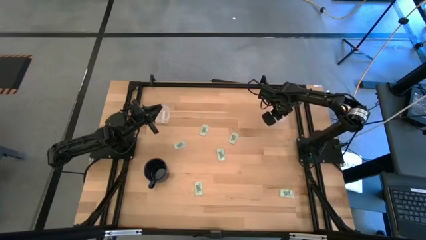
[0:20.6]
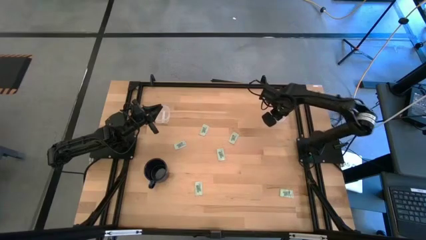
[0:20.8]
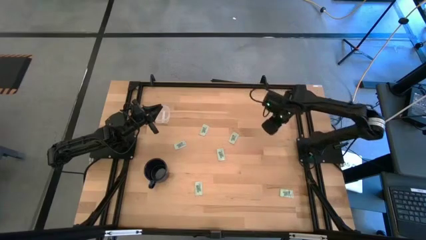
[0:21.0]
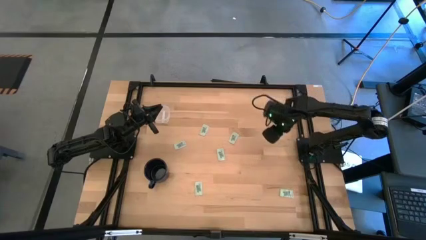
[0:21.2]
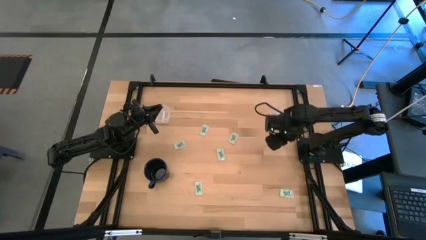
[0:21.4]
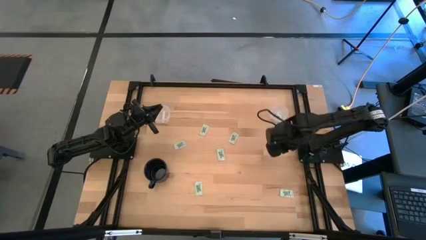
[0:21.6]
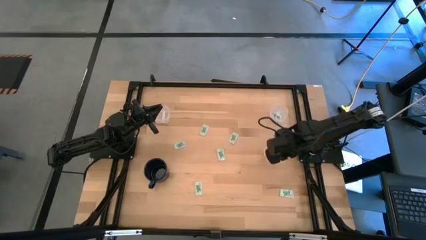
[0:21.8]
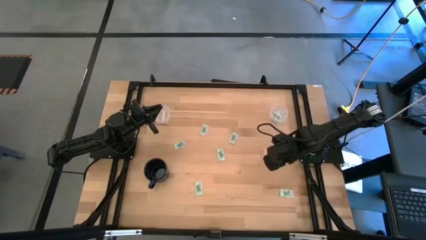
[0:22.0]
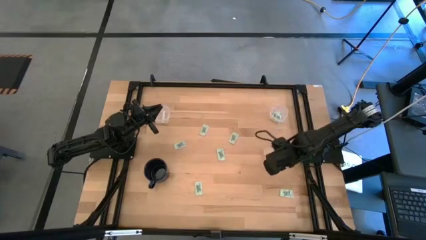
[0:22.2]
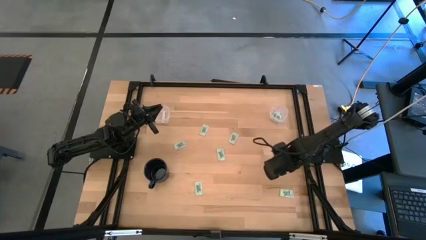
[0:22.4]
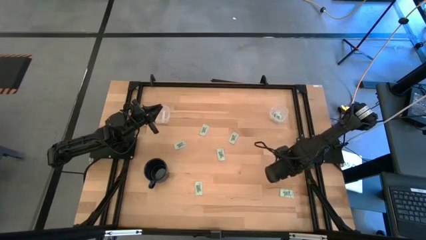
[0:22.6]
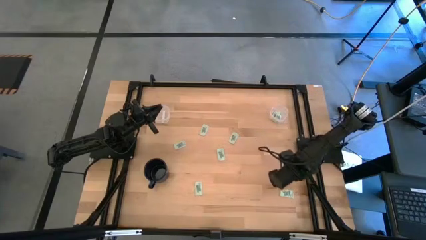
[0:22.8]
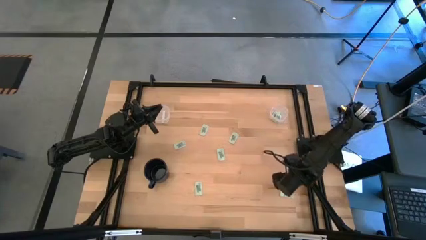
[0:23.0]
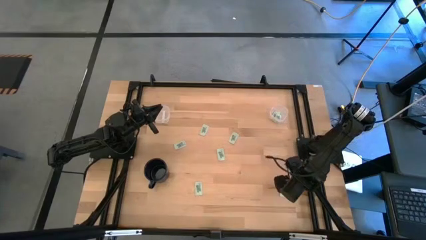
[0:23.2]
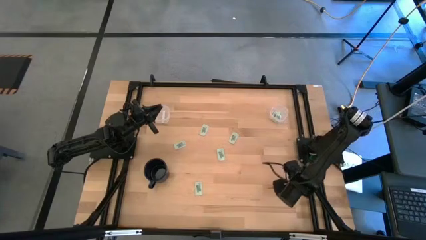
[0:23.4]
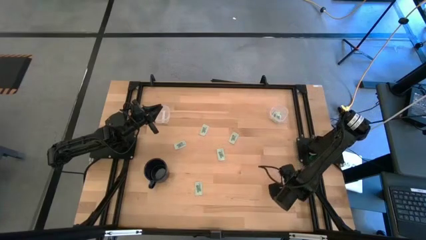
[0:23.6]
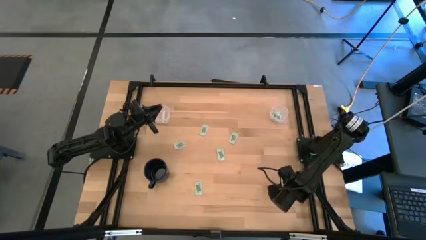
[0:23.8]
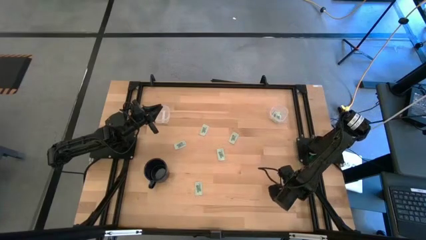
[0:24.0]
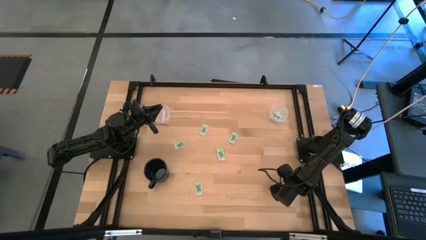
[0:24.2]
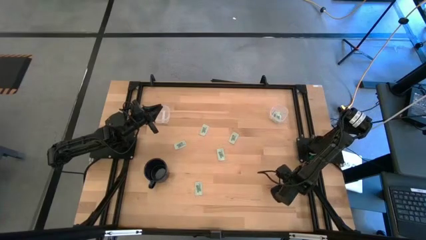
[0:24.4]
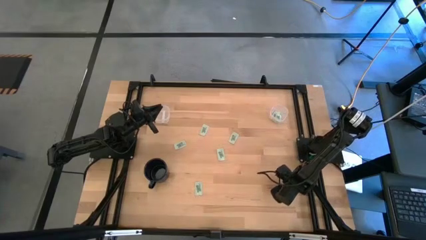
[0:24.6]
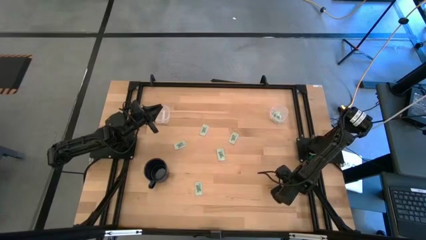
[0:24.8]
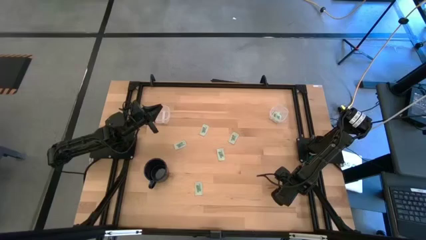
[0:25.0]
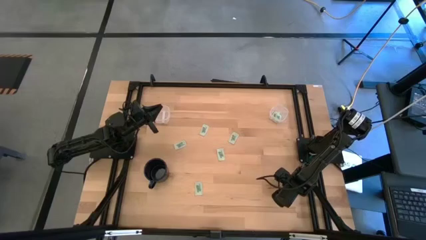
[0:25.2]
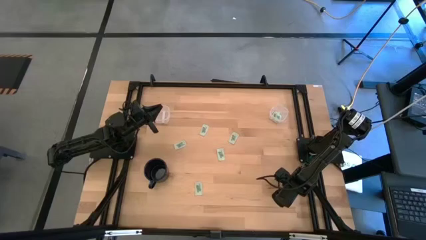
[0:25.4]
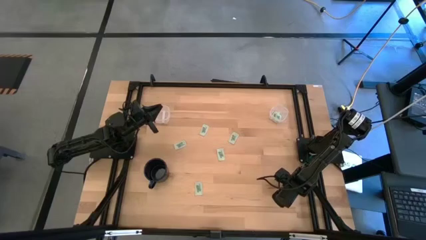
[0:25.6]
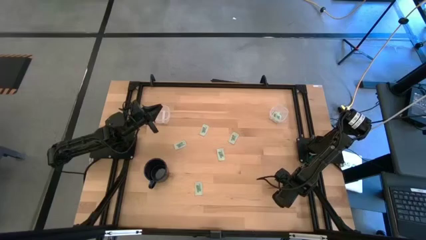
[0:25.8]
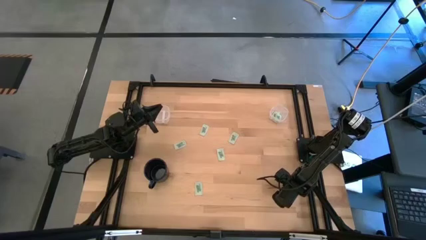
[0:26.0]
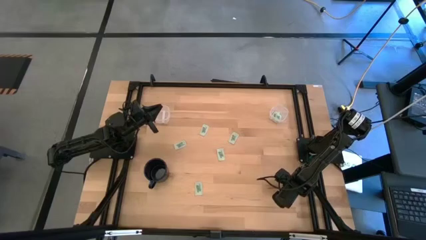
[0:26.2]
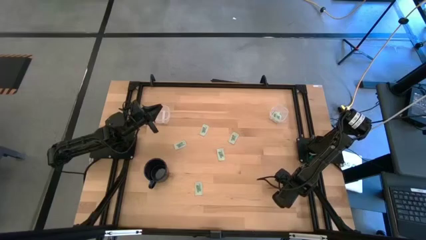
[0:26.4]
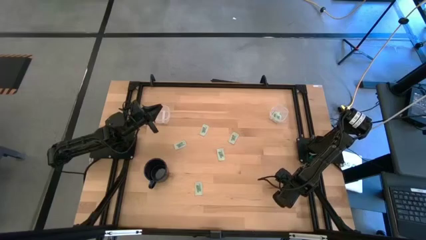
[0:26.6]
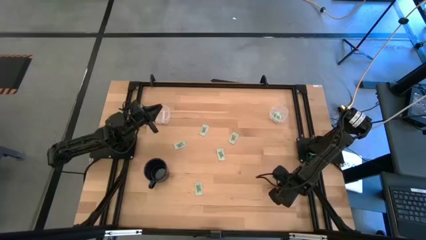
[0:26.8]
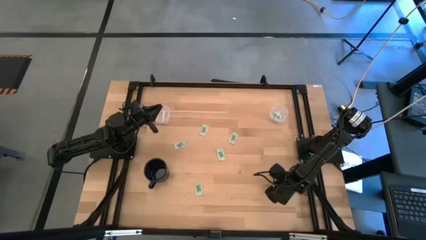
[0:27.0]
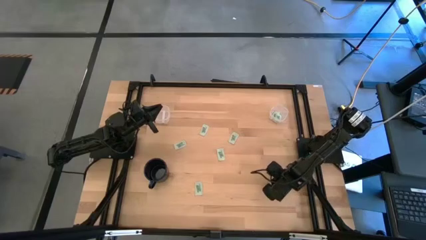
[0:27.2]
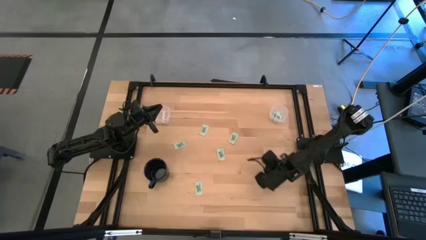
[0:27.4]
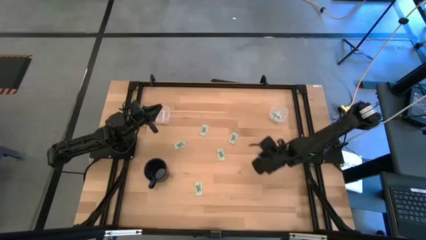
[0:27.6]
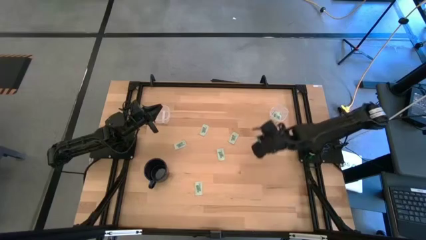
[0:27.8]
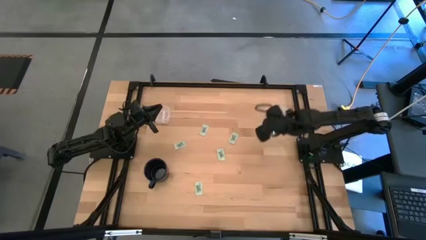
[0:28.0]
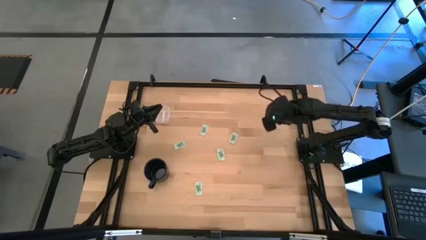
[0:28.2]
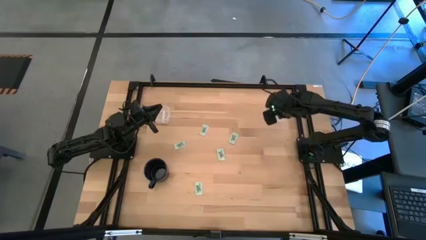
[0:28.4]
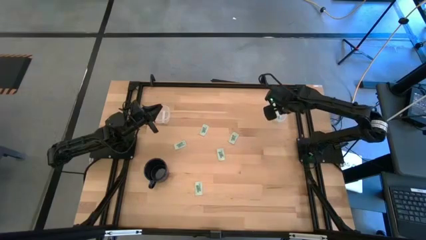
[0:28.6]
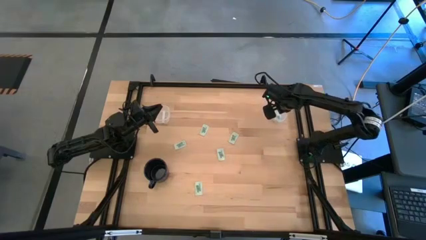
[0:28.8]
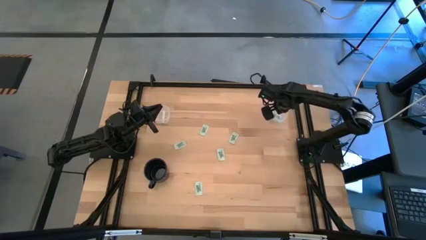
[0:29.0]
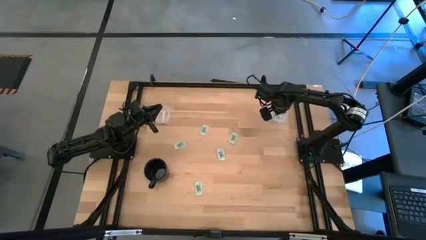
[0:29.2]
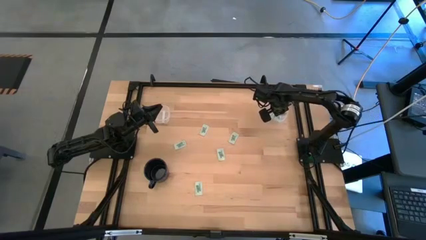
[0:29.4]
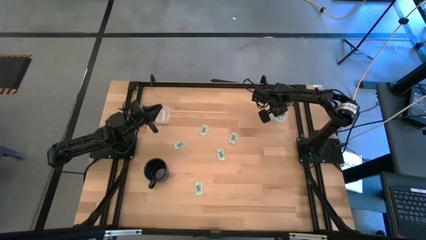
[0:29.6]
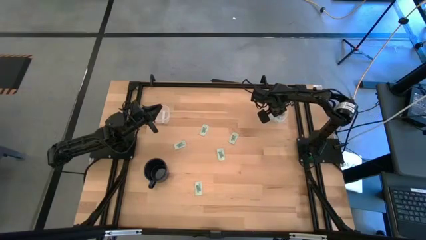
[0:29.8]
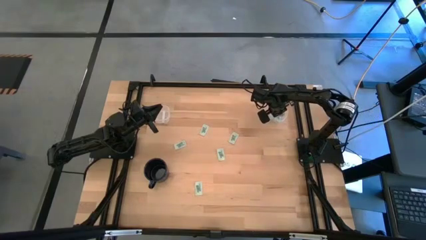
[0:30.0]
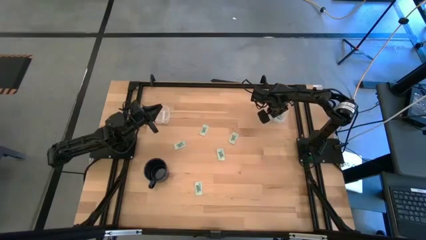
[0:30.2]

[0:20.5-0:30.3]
Task: Pick and place Stevia / Truvia into bins
Put the stevia packet into the right transparent container

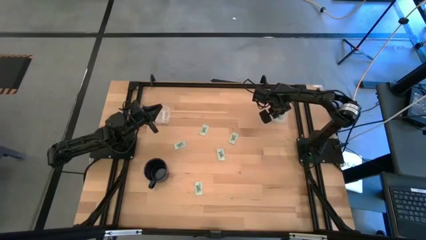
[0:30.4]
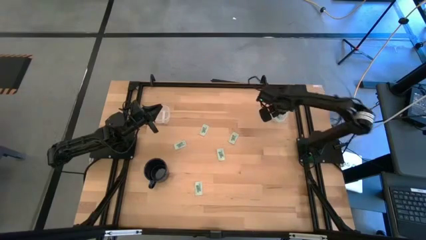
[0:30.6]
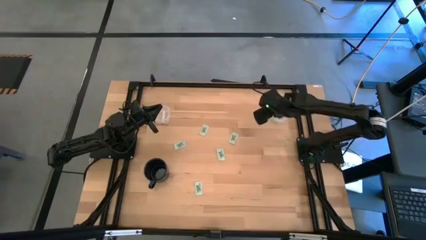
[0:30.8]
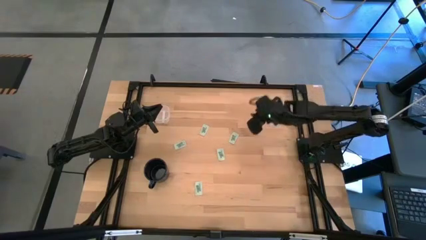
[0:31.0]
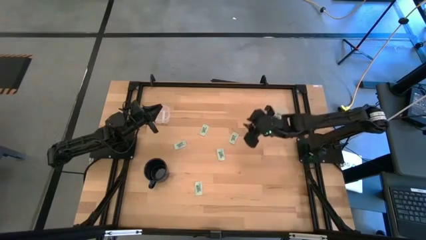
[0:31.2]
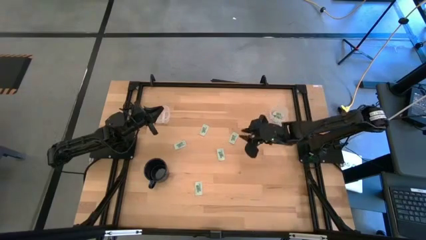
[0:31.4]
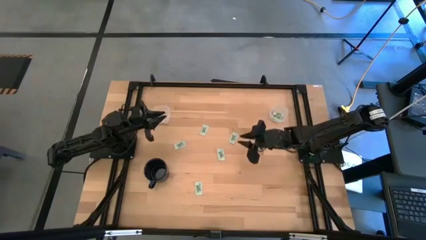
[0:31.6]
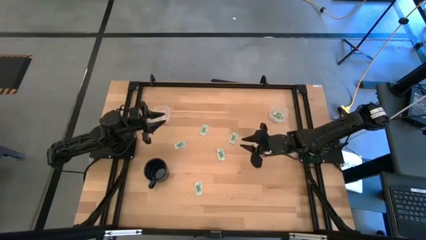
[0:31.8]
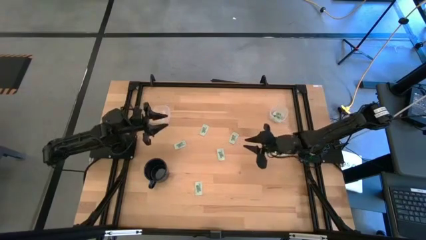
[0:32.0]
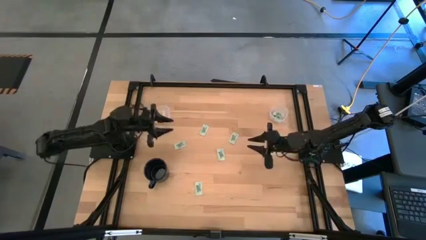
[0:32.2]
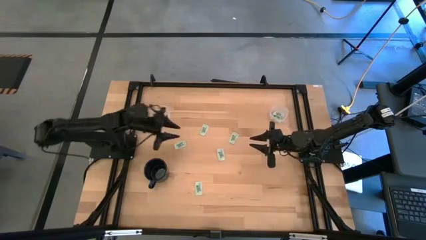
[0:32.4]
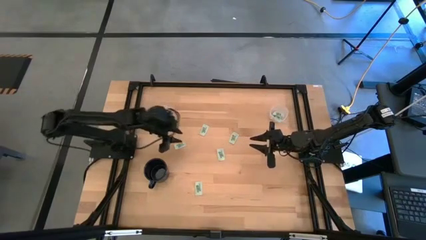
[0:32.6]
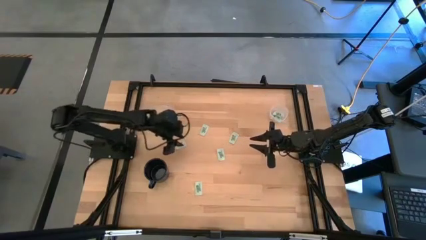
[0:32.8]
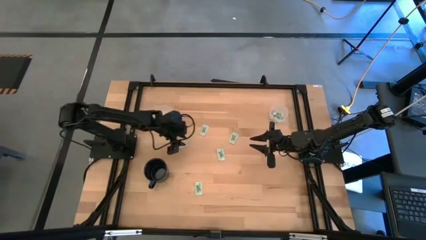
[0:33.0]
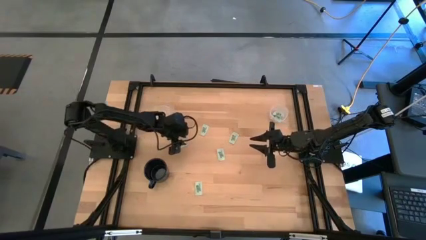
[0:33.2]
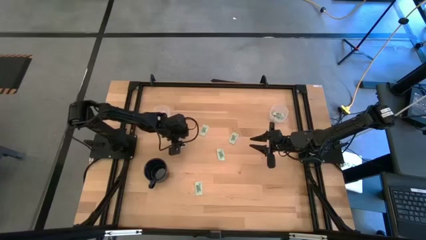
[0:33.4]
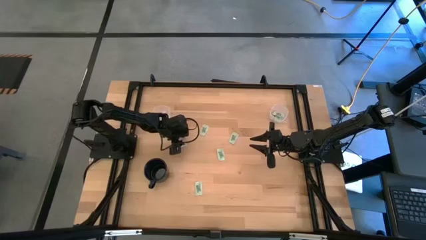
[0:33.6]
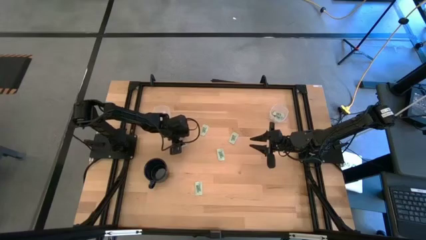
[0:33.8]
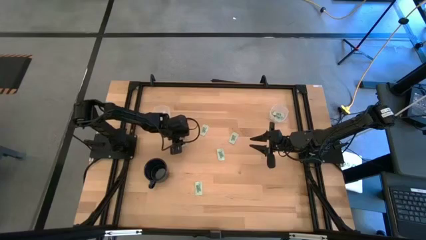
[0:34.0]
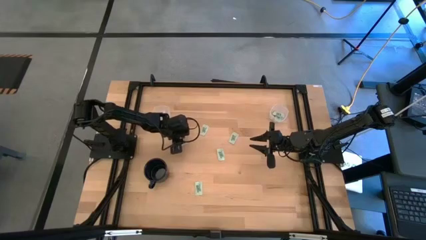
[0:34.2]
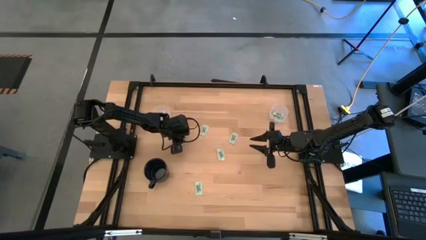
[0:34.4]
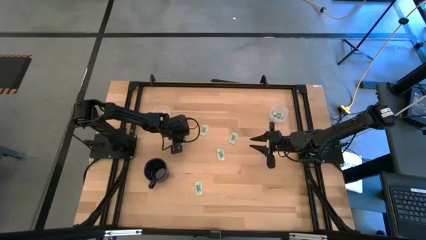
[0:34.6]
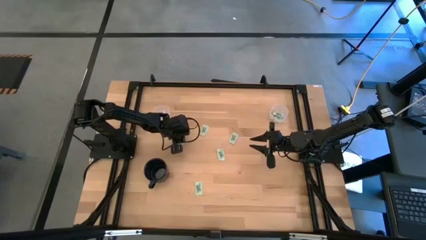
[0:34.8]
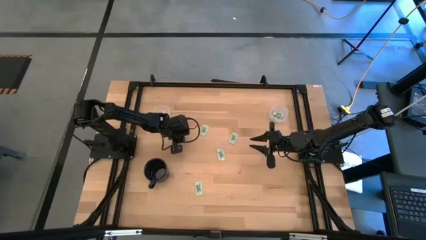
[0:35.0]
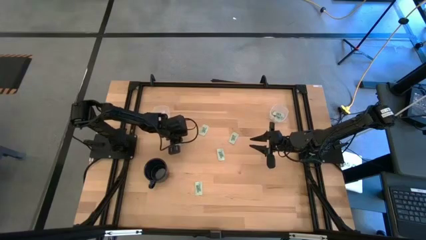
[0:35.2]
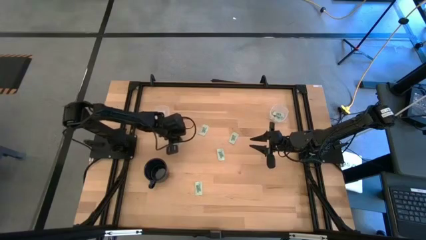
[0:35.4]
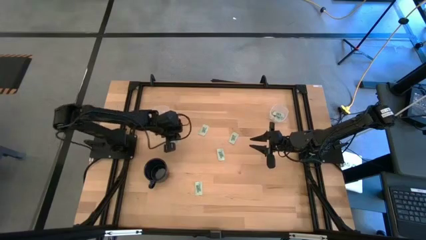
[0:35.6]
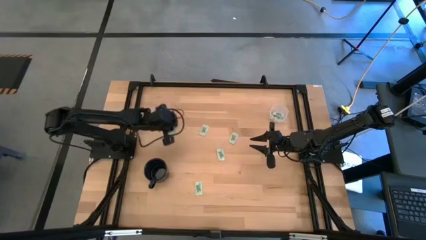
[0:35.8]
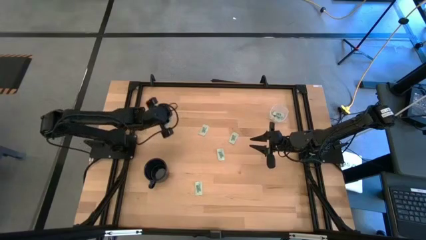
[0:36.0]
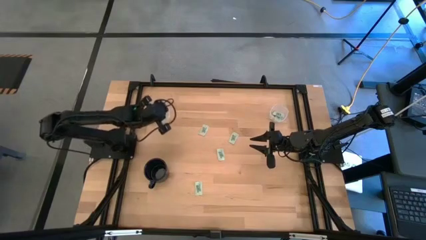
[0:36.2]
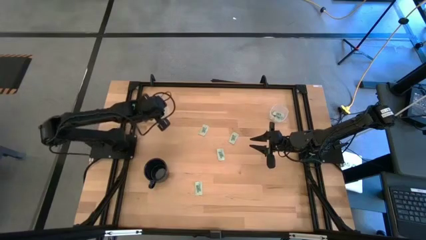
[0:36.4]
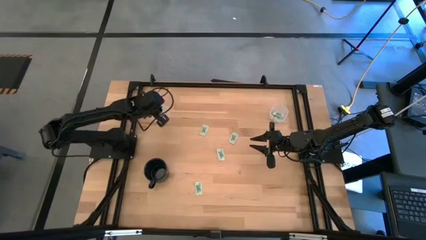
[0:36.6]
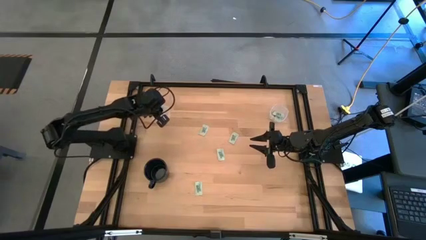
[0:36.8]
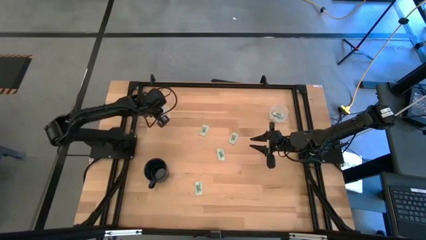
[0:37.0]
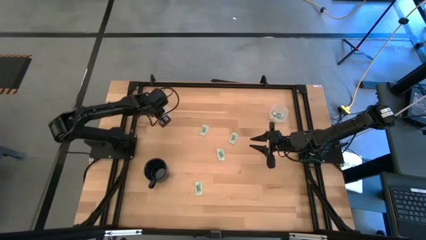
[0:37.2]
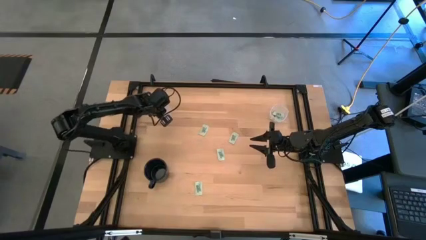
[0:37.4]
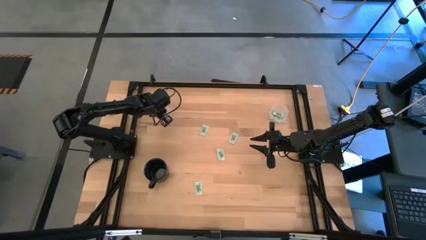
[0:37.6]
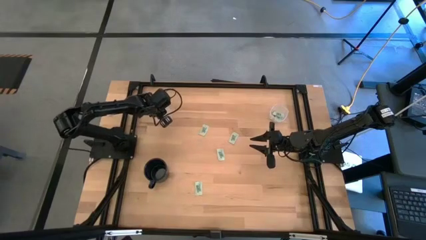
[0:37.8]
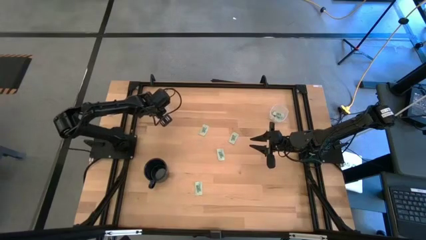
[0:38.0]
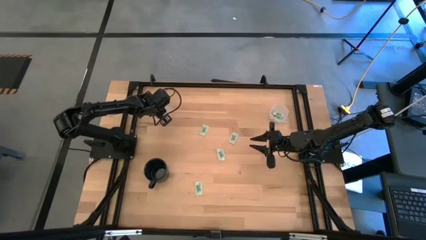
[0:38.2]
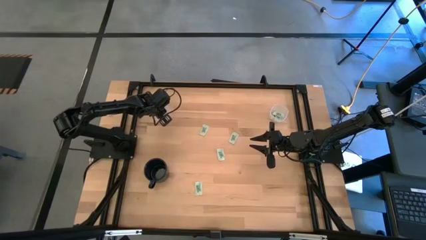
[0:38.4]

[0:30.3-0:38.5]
Put the stevia packet into the left transparent container
